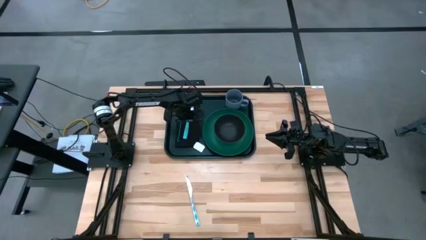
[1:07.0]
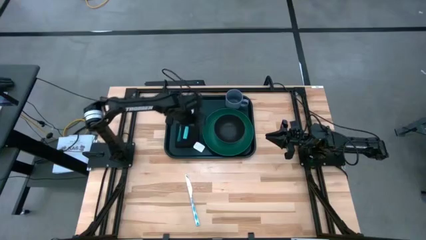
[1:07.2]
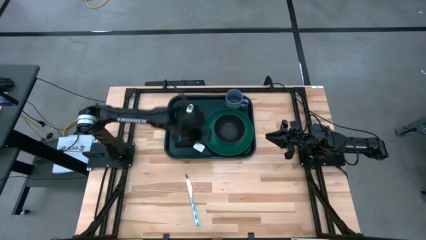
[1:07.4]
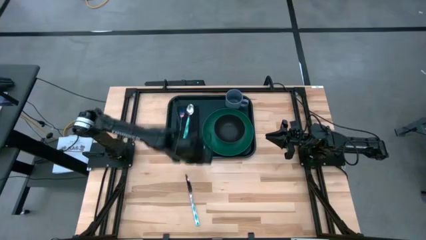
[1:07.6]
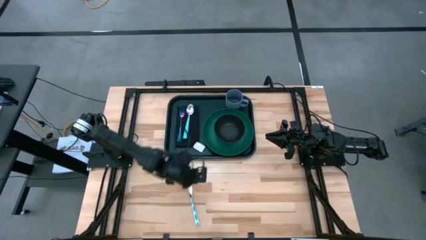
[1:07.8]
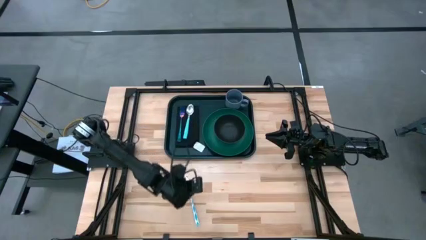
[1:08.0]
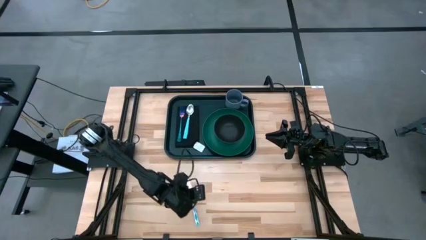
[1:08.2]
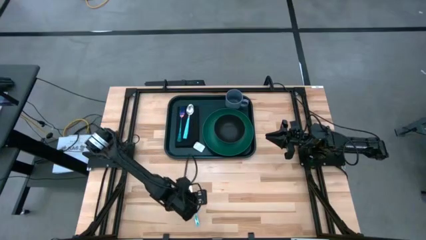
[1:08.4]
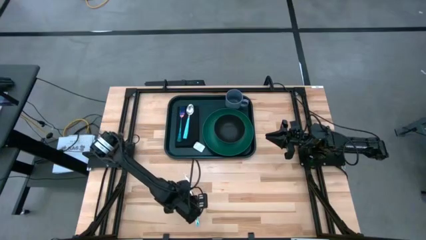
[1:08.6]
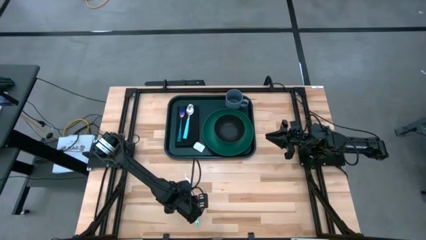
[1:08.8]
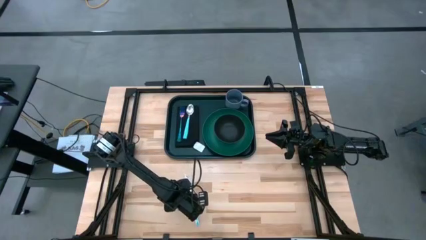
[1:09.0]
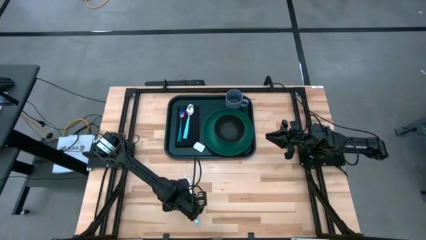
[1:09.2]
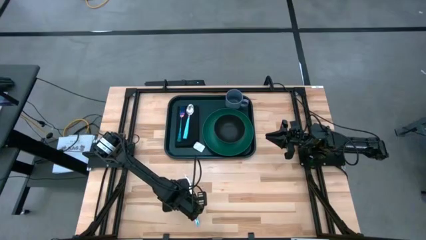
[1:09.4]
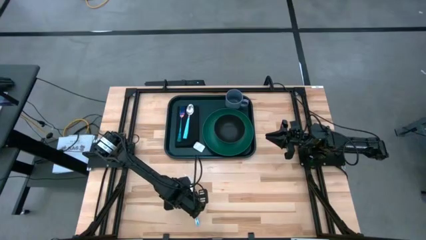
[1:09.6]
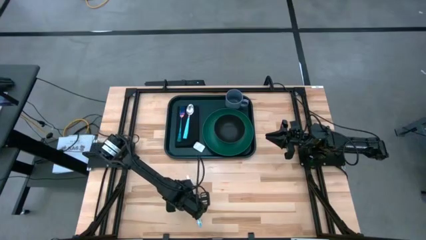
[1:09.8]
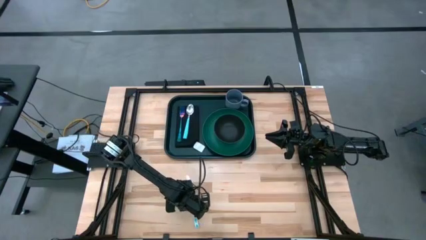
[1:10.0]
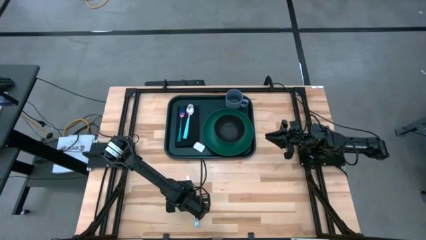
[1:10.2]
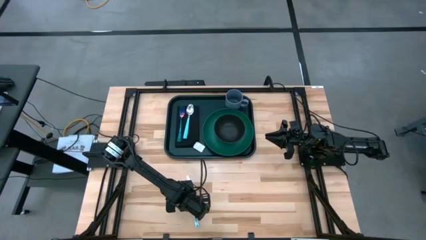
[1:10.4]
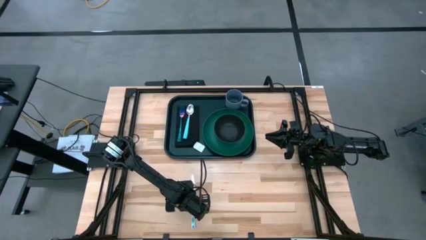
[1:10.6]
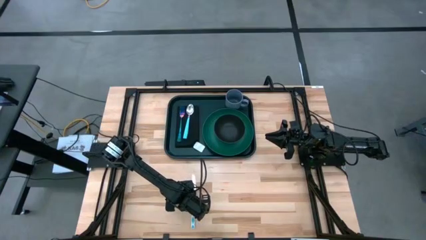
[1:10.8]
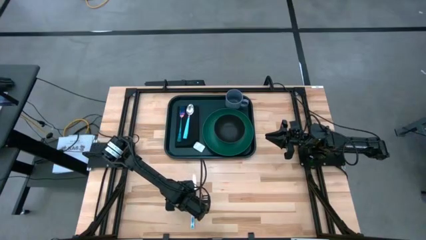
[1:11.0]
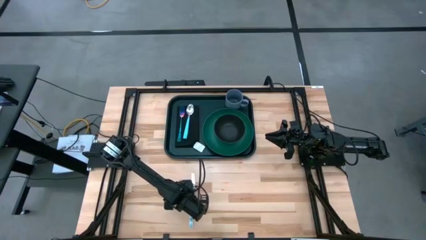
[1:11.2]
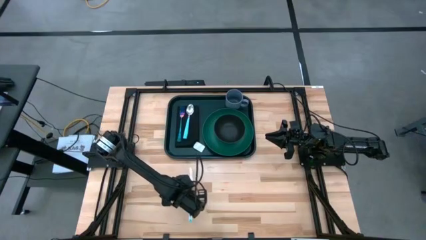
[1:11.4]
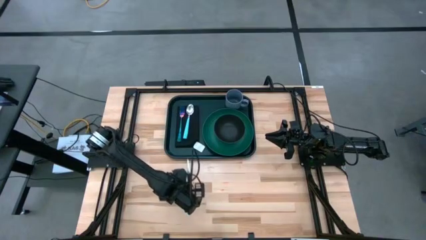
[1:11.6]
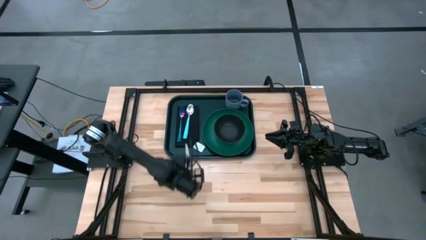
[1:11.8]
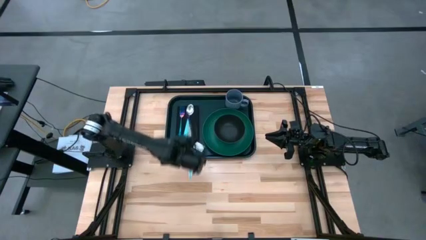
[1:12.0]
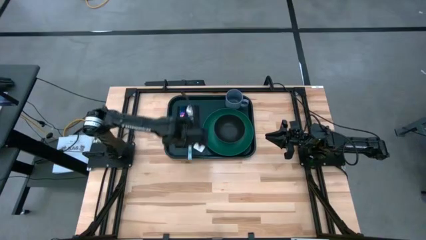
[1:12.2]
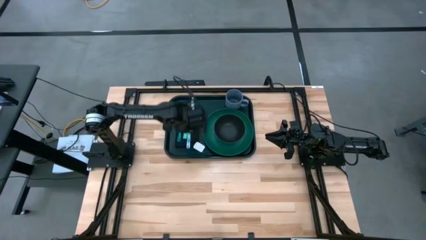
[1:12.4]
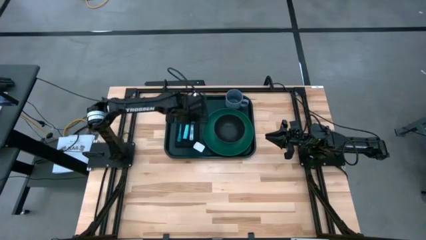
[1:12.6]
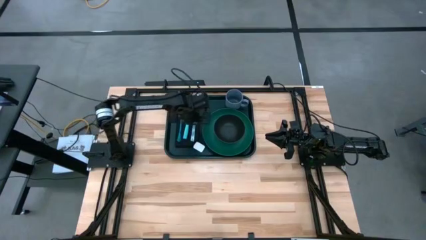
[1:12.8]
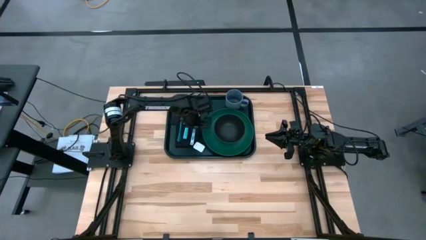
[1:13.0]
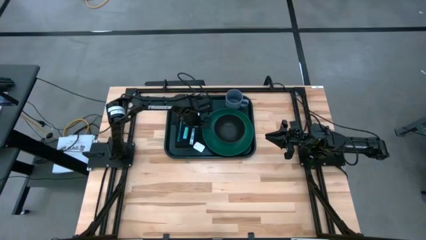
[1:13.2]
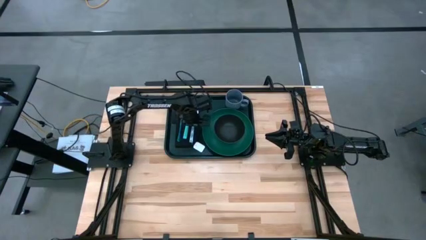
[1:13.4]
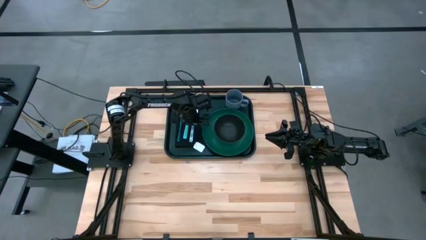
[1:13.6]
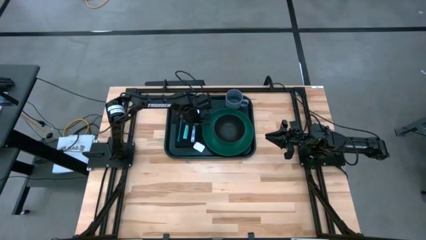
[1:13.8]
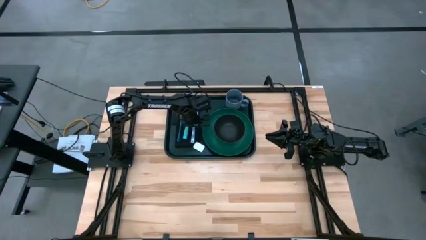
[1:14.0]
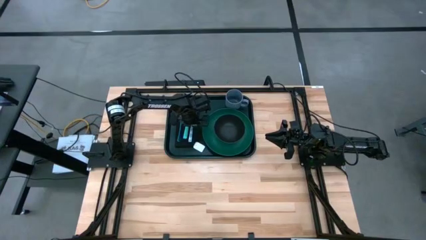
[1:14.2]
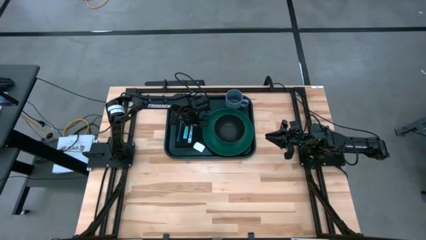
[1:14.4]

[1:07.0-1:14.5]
Task: Set up tray
Put the blue pattern table knife beside the light blue spoon on top of the black towel on the black serving tray

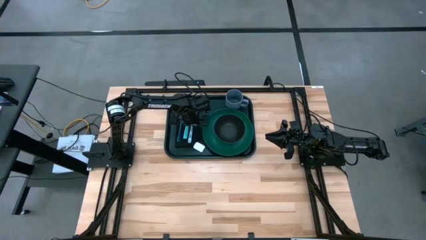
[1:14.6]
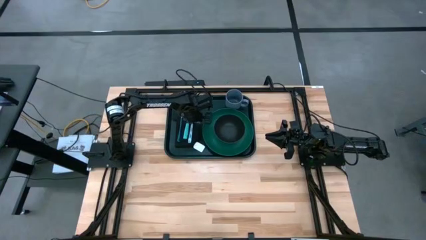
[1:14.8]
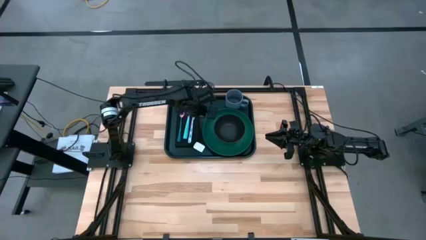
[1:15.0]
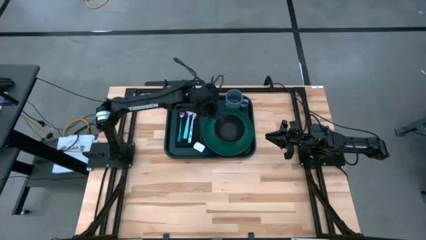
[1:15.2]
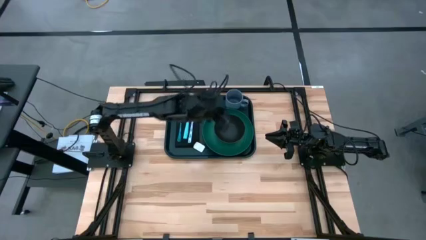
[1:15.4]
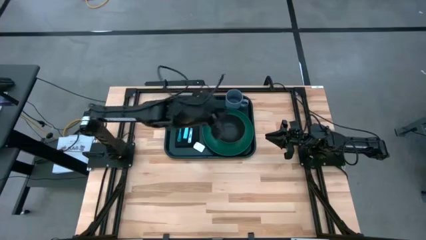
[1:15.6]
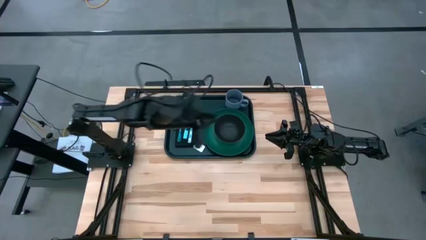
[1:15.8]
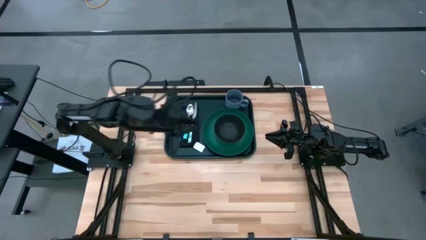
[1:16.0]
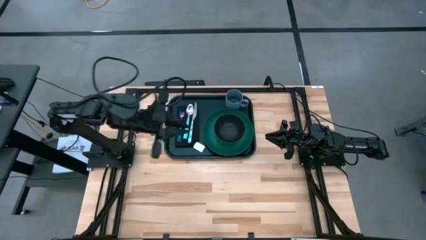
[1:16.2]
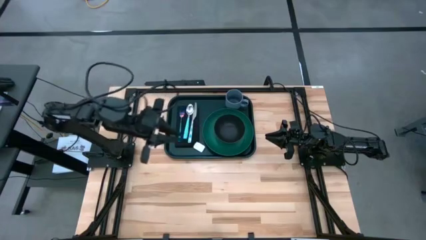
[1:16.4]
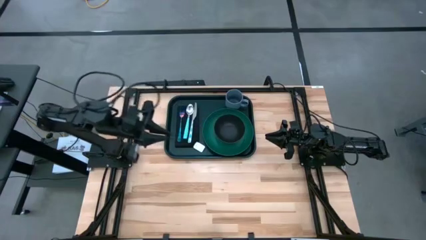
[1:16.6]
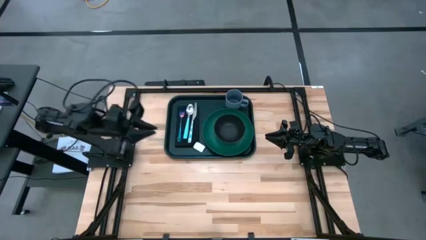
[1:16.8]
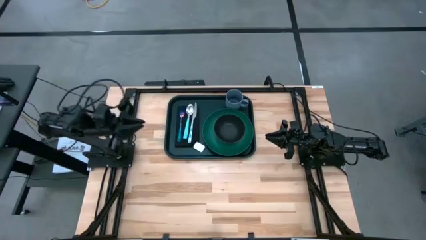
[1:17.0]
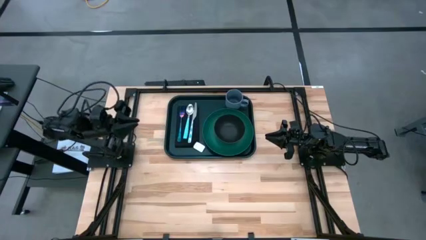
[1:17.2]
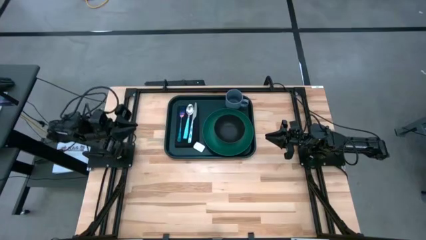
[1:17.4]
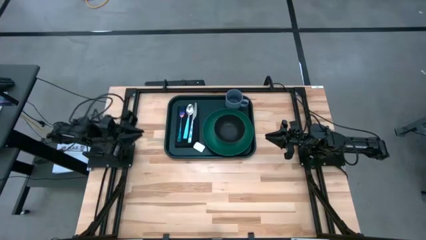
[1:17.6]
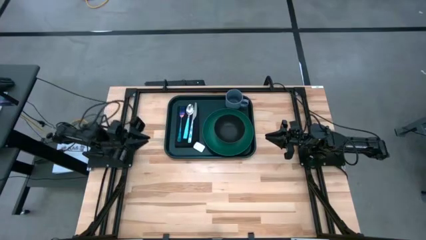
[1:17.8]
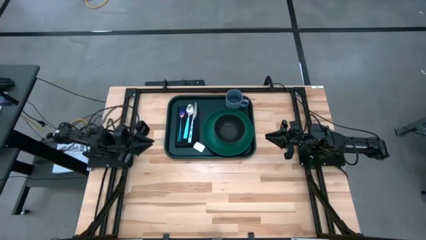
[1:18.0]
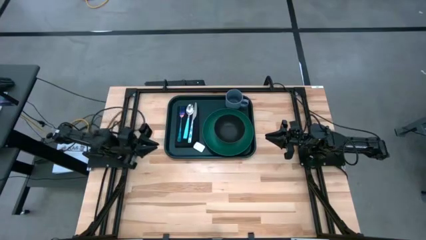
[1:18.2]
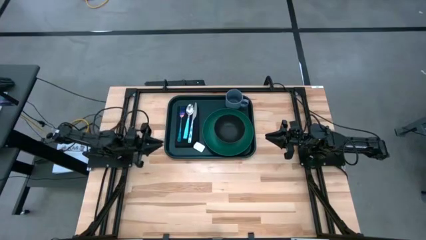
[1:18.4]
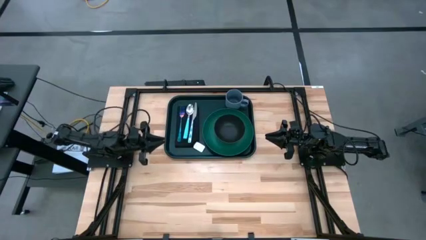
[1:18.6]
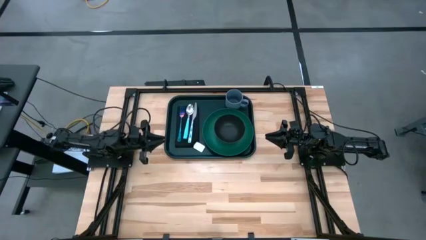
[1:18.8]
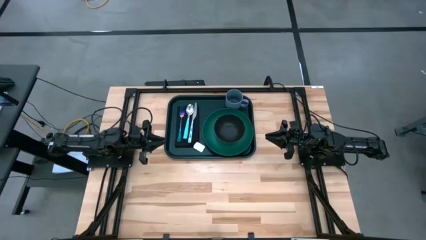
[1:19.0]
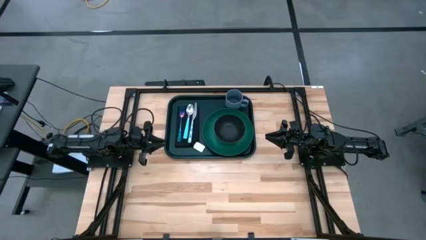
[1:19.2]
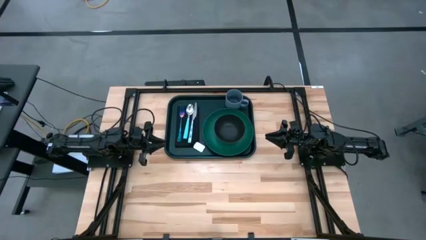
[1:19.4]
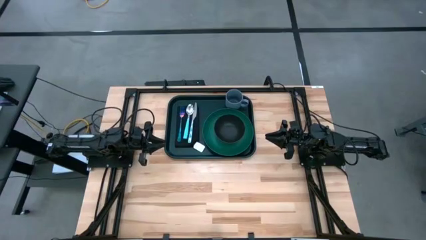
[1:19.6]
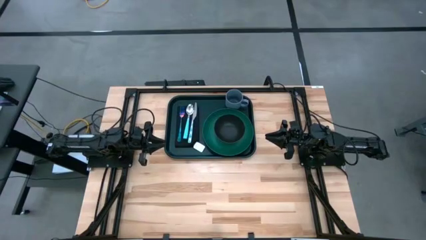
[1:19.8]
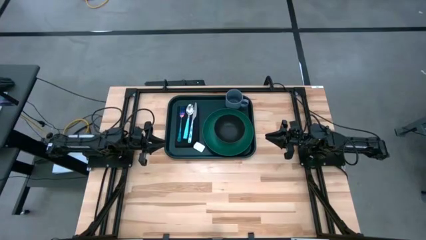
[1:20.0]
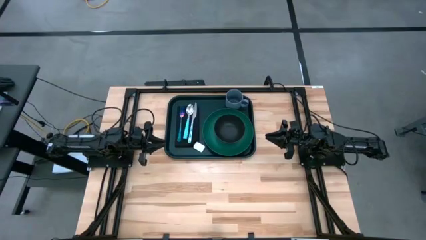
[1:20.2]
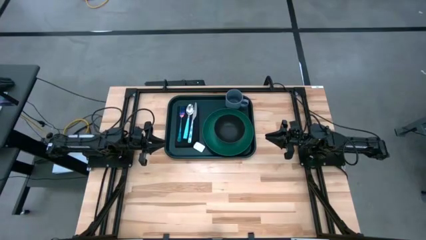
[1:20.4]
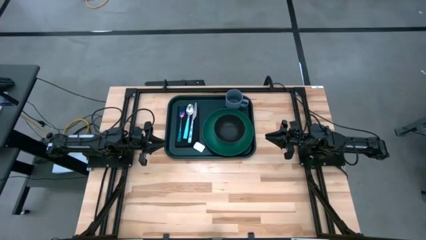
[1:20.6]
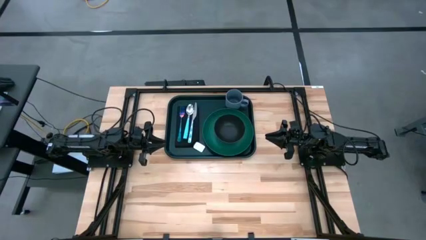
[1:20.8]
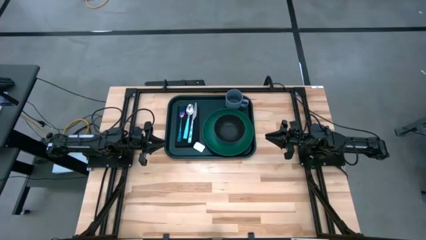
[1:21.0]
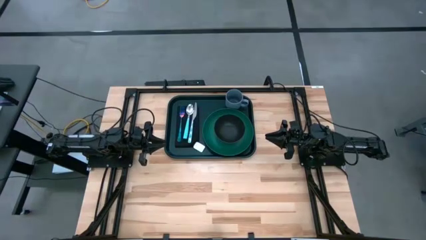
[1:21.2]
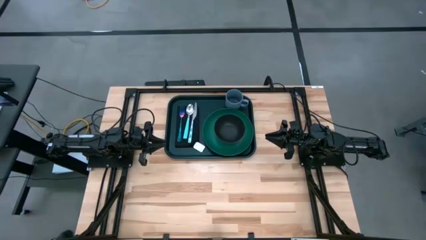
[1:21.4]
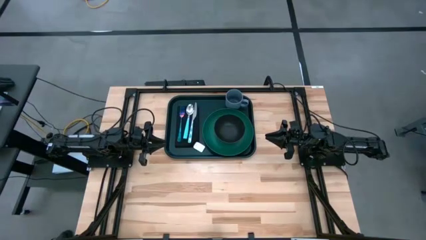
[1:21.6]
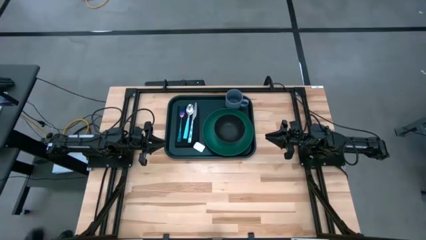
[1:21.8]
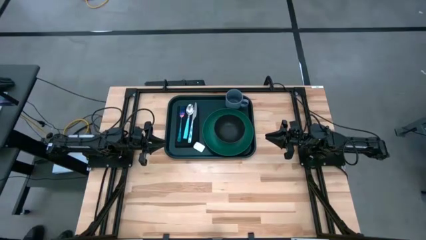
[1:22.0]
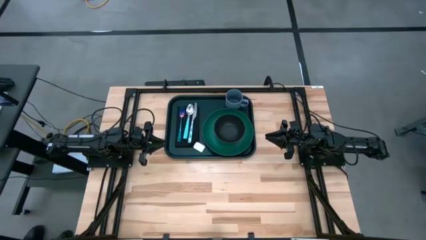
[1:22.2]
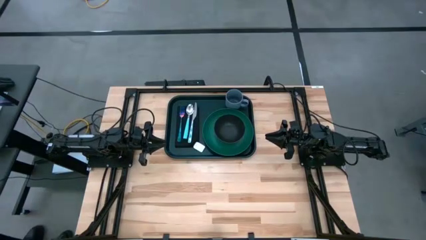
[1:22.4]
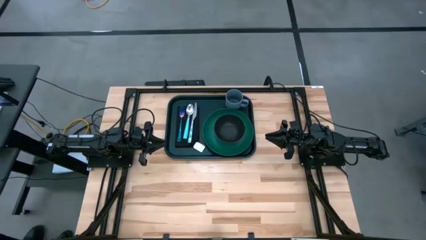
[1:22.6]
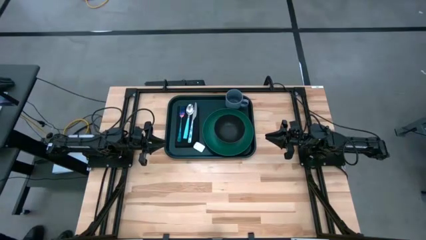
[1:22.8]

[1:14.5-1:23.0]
Return to Home Position
